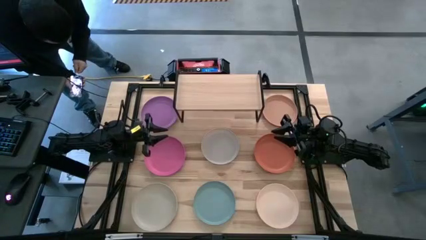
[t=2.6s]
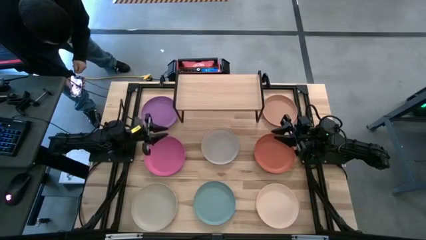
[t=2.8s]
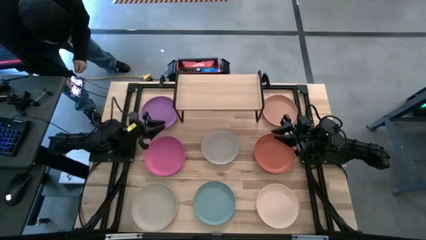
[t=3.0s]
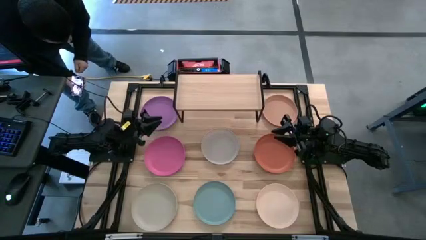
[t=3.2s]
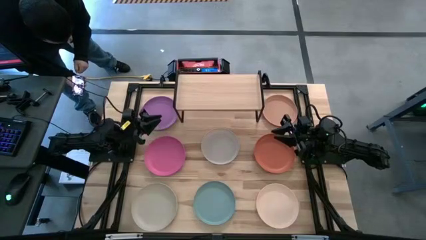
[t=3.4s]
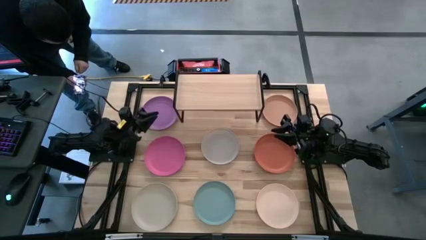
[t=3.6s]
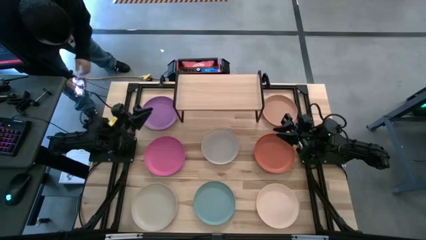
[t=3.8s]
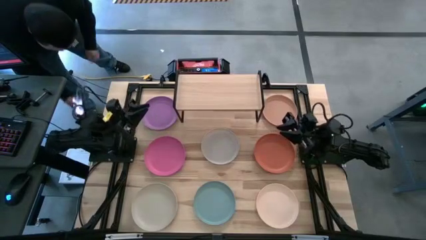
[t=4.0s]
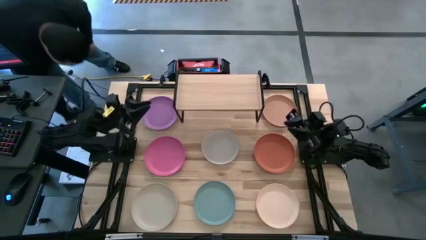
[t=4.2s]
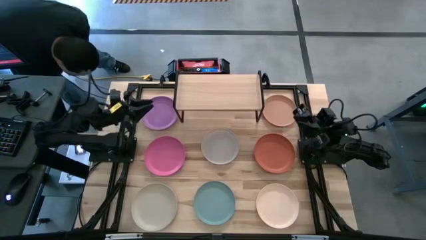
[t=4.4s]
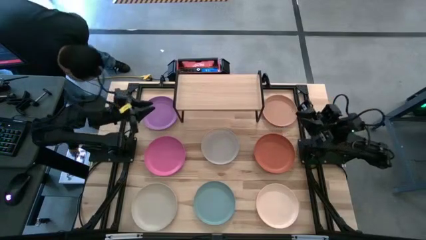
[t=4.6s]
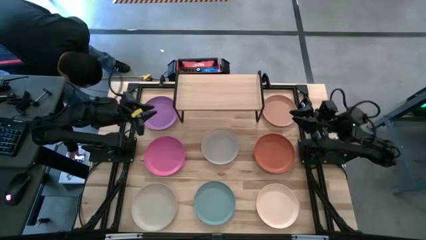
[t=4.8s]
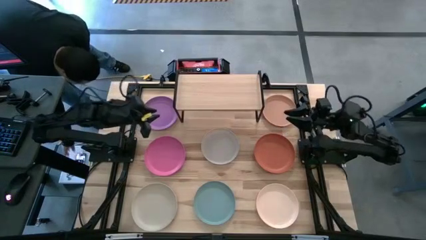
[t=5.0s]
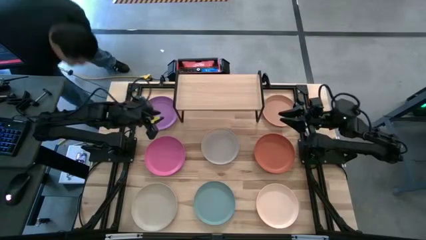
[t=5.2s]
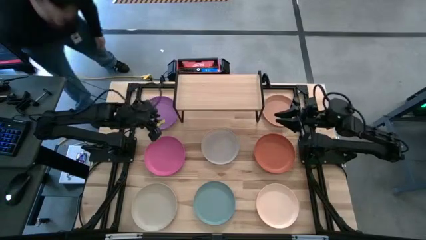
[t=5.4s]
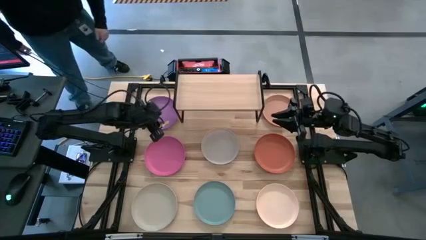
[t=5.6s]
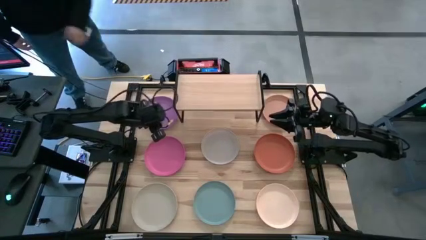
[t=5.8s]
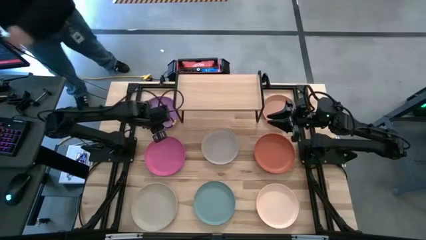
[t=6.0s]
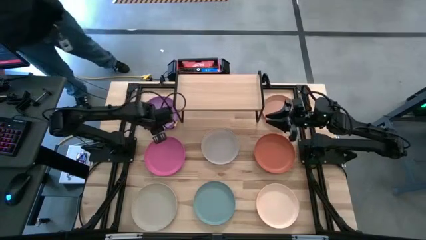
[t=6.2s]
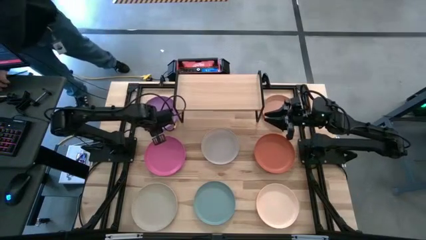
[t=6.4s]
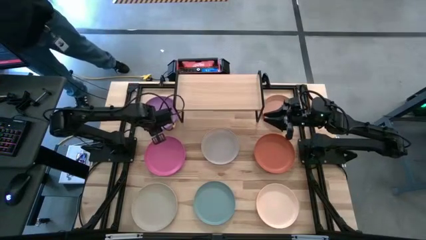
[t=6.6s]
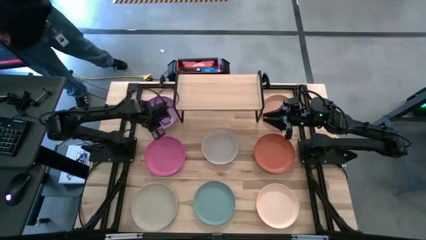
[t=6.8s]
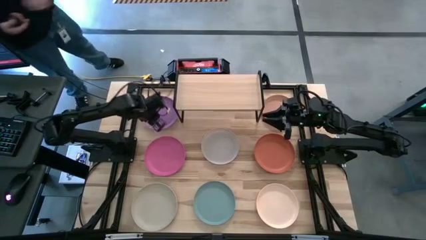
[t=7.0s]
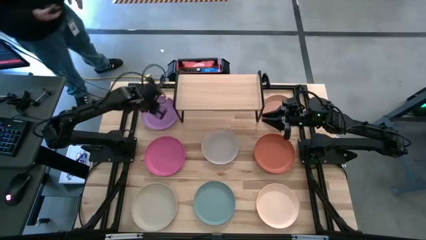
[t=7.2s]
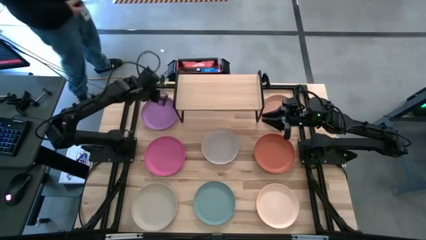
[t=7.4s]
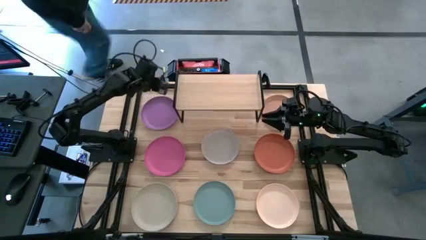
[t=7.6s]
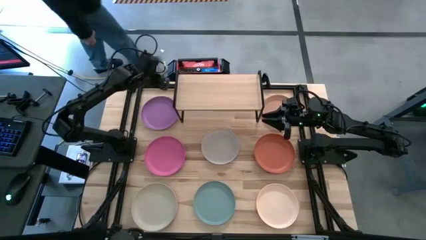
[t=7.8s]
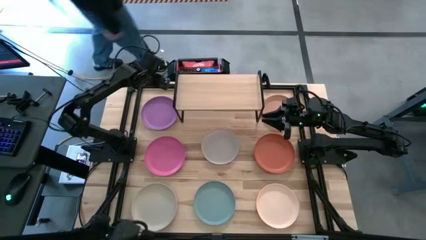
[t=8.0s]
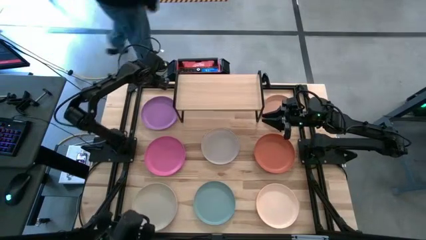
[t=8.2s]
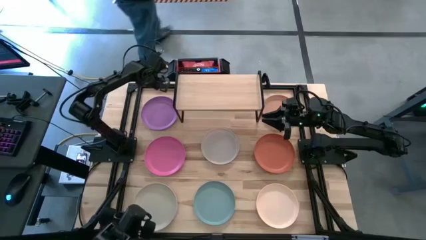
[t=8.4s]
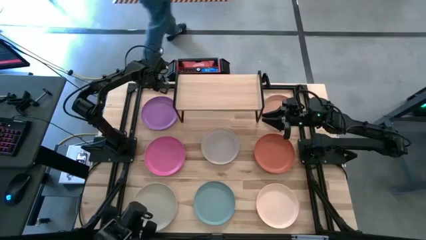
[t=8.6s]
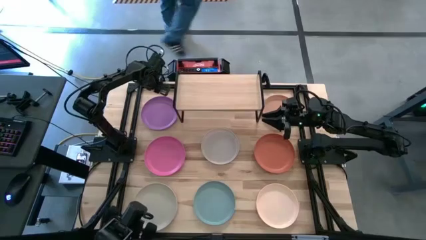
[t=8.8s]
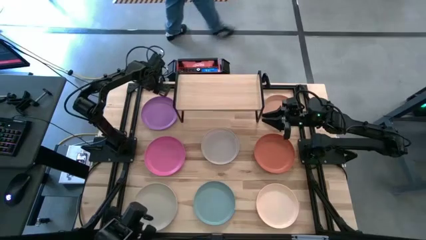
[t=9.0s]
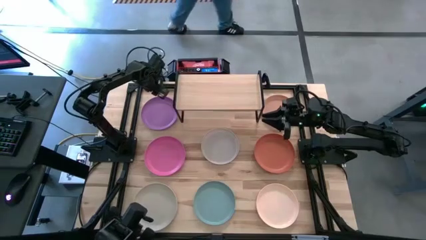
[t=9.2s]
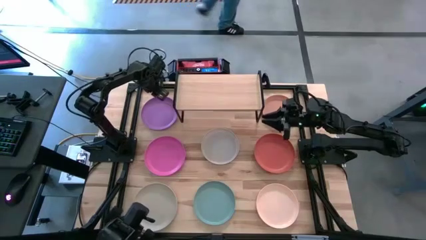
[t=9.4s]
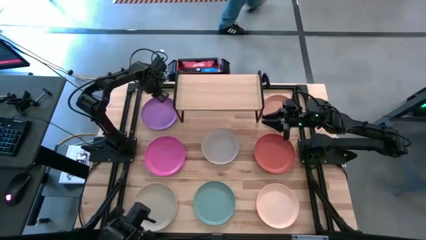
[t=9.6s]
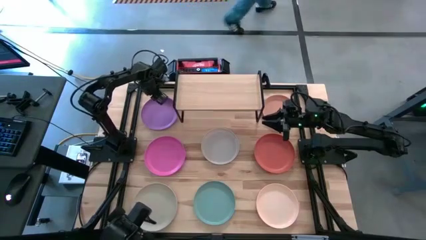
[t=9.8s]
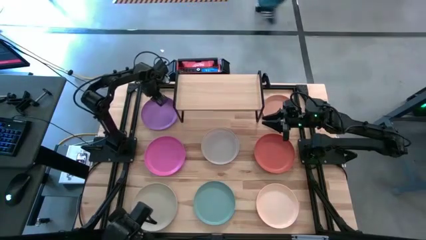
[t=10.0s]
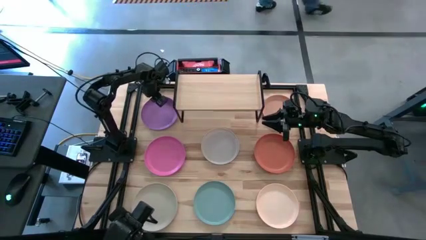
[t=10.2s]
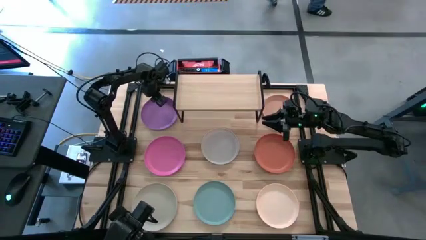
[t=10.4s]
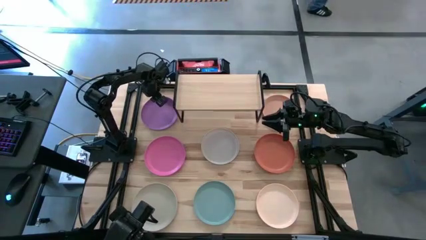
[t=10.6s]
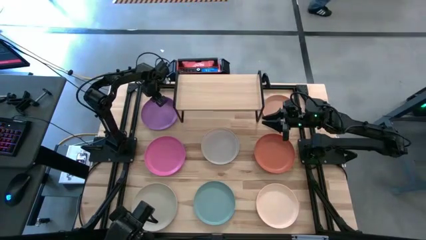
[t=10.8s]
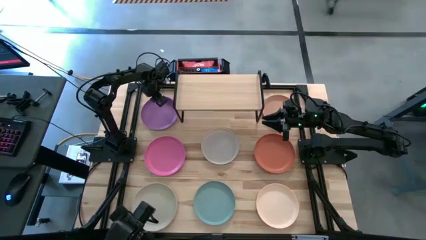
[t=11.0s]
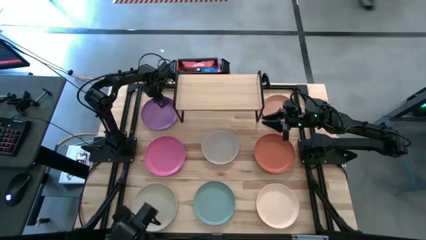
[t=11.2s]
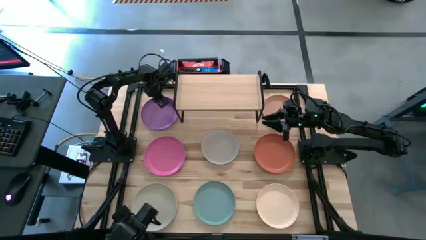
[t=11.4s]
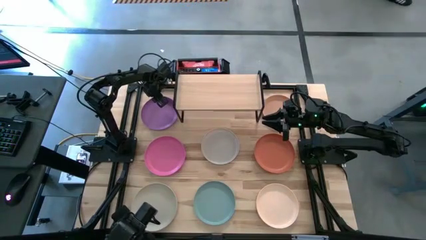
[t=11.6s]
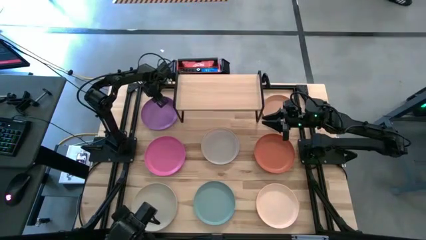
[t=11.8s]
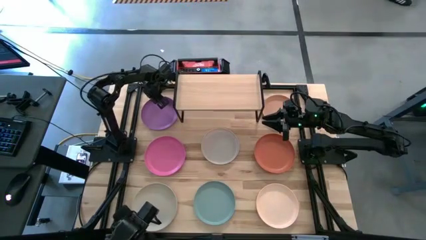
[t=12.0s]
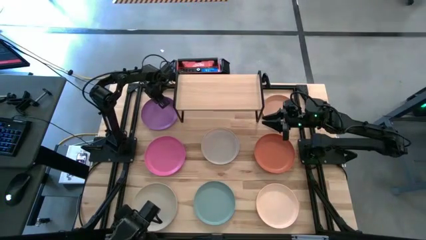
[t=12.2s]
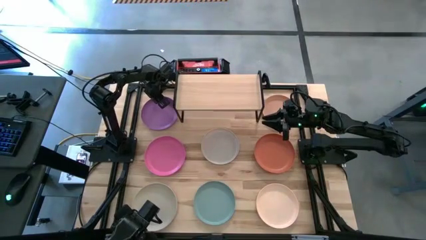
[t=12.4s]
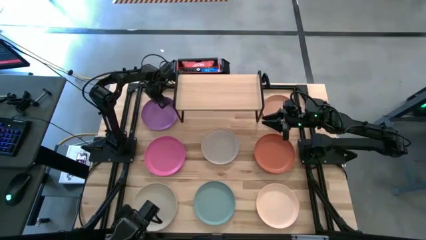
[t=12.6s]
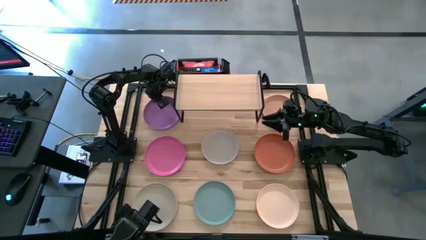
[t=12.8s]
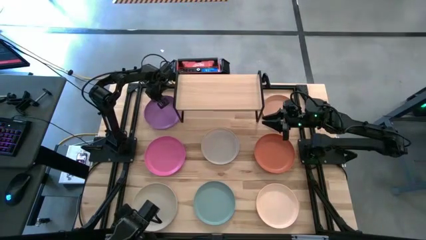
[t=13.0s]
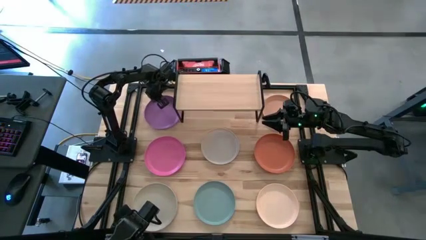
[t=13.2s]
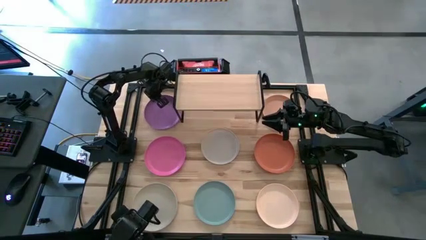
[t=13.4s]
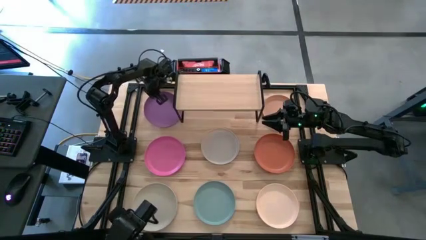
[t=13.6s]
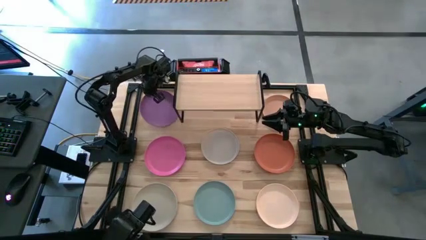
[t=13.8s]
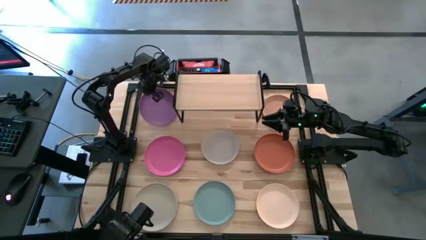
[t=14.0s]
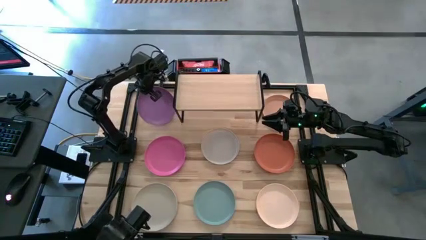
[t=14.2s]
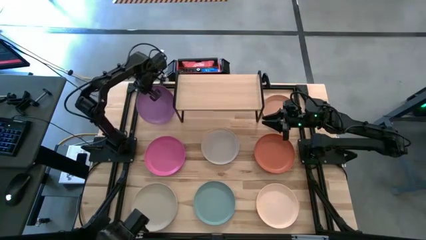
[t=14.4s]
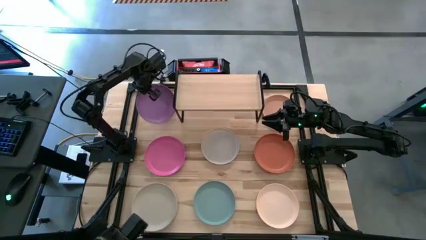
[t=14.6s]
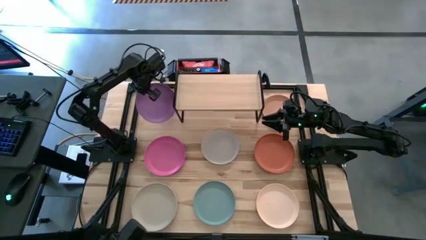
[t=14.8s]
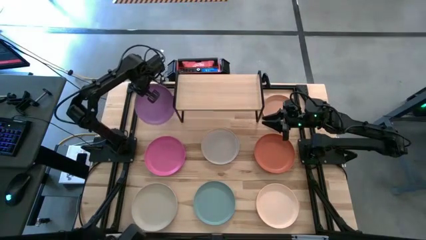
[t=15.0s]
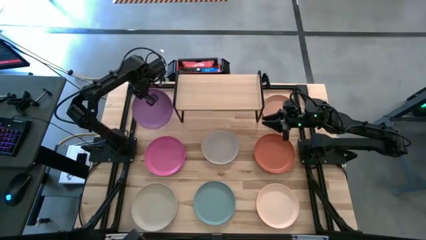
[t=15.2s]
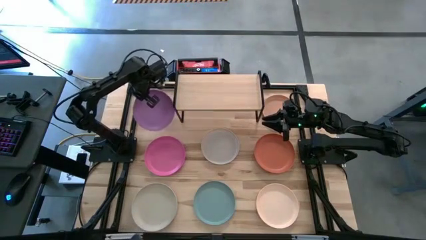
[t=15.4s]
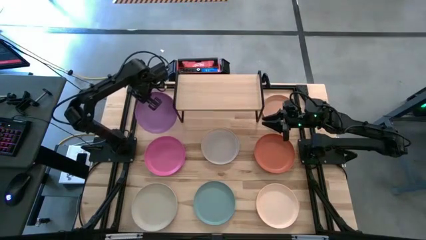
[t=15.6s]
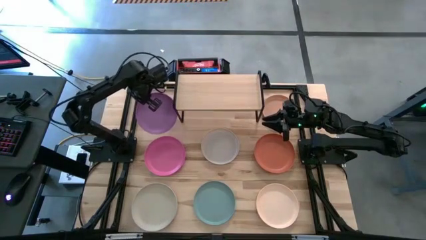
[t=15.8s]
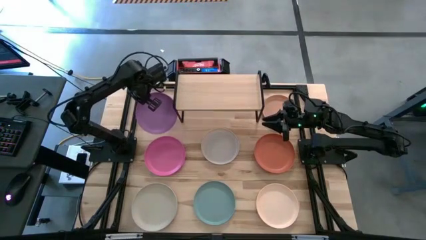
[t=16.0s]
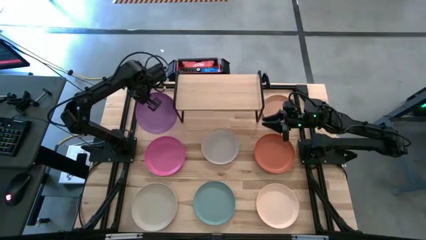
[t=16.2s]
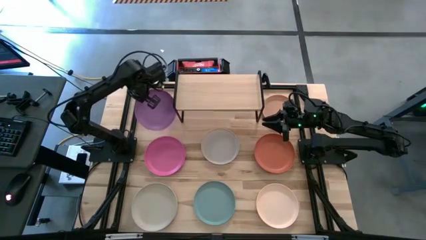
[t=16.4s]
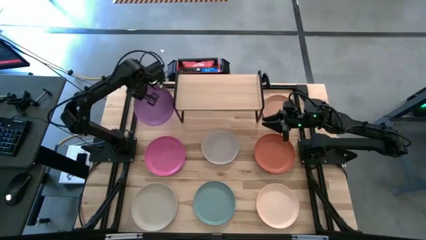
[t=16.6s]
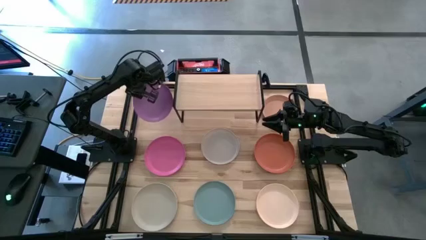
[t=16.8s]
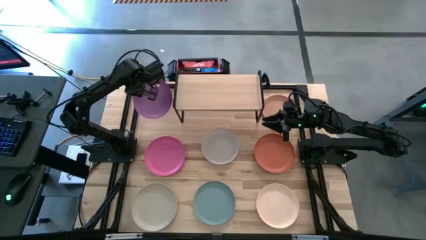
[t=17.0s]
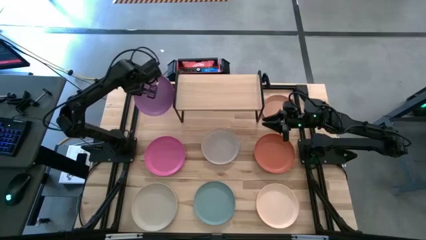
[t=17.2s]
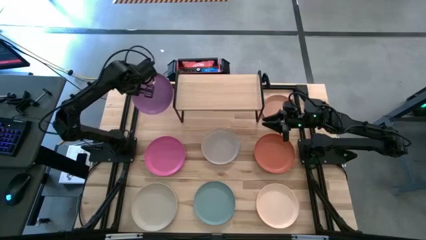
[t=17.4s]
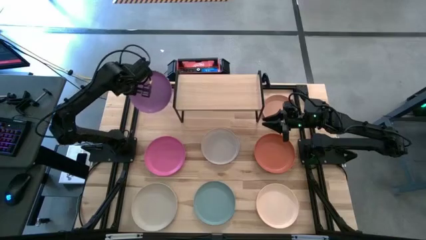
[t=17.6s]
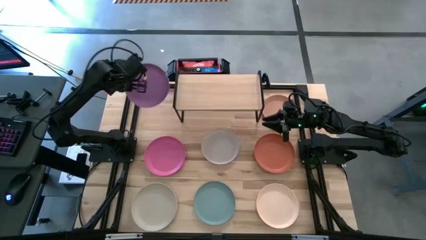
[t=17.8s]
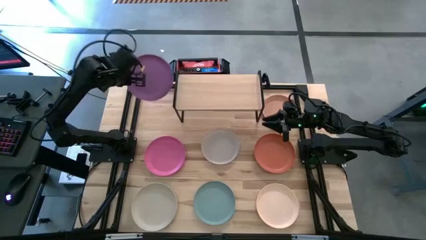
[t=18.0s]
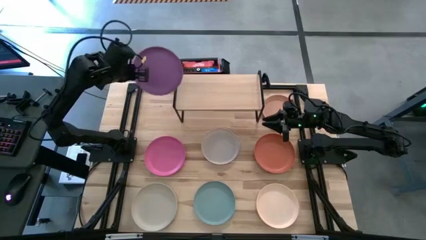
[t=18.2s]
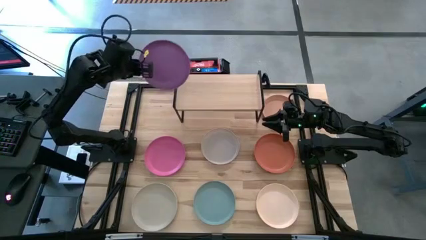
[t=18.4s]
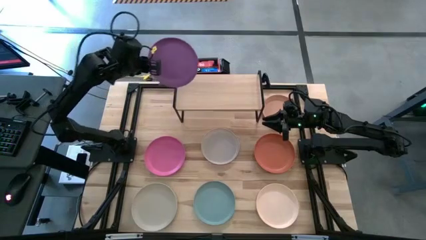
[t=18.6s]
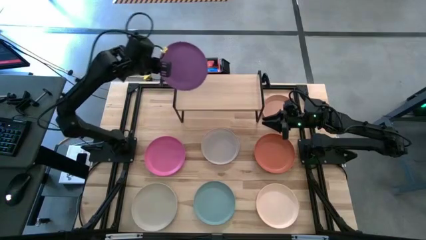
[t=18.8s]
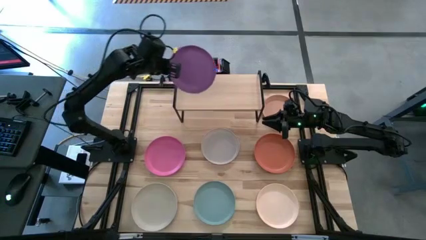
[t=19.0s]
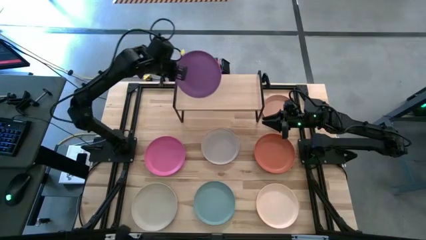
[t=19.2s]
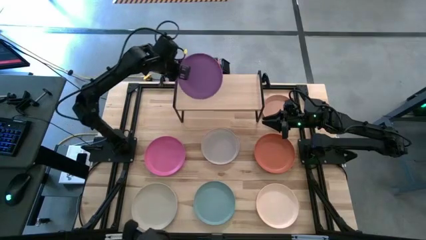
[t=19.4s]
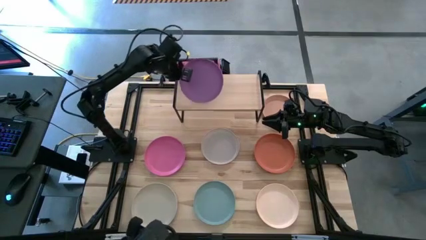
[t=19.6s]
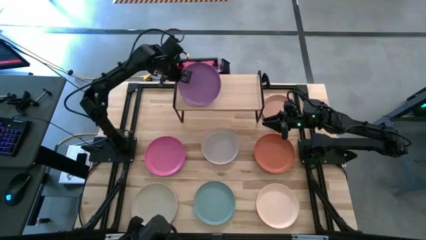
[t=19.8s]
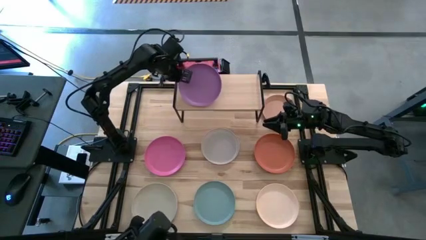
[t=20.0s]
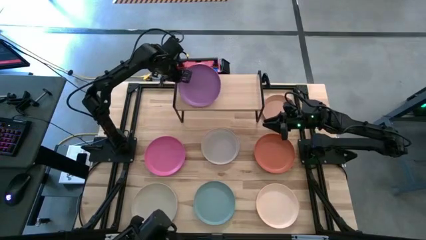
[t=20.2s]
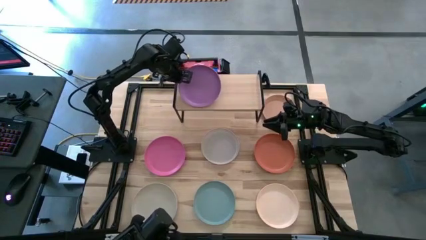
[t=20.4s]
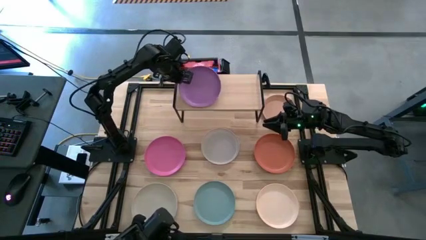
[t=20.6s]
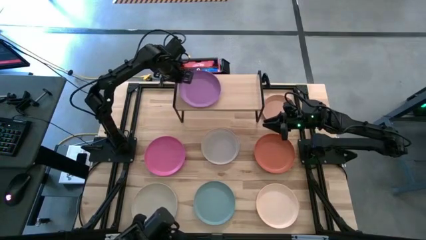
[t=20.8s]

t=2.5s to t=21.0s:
Task: Place and stack plates onto a shelf
Put the violet plate on the shelf
